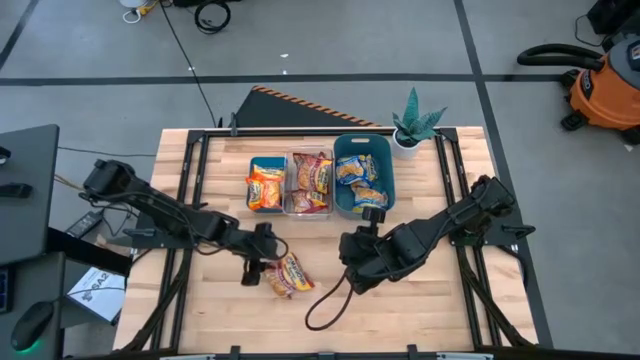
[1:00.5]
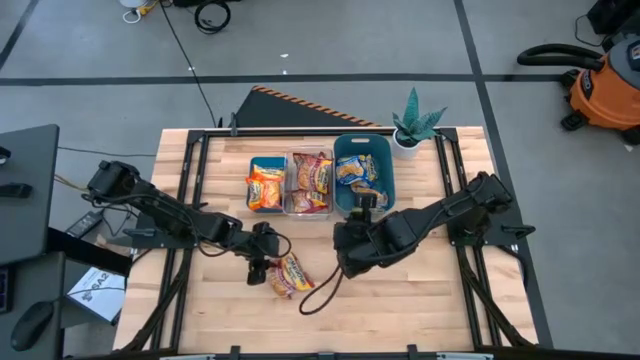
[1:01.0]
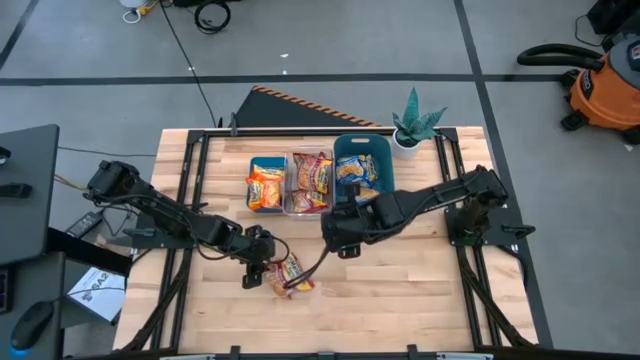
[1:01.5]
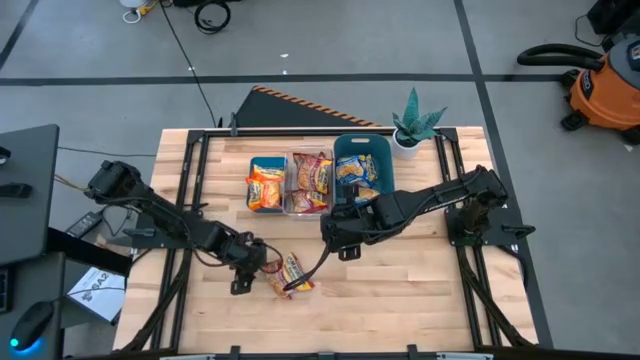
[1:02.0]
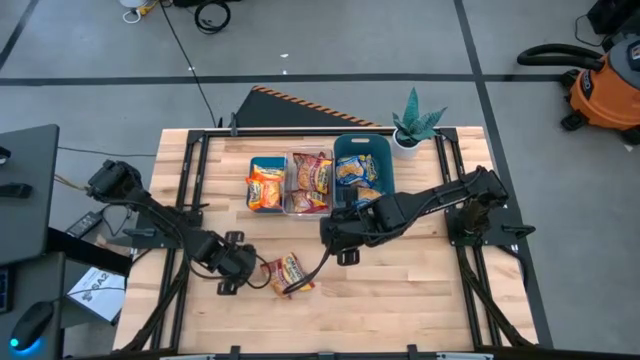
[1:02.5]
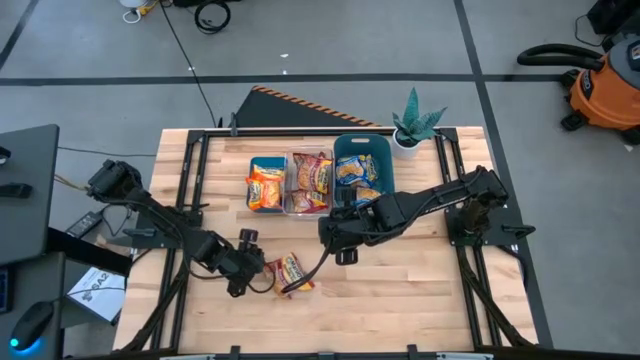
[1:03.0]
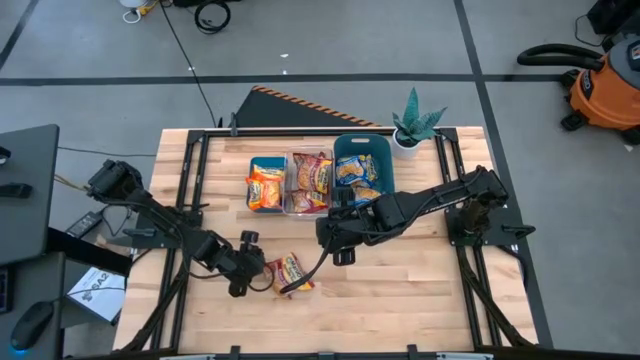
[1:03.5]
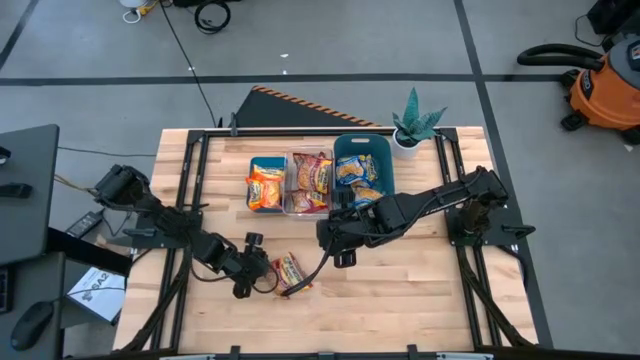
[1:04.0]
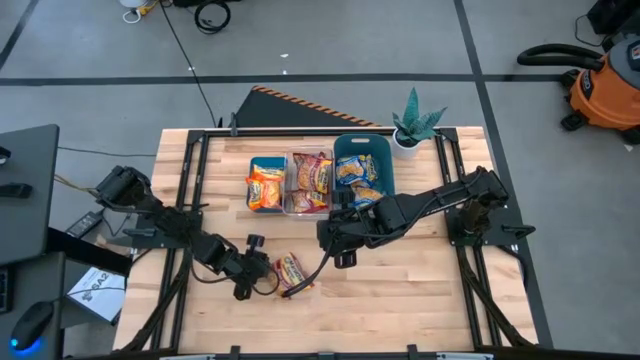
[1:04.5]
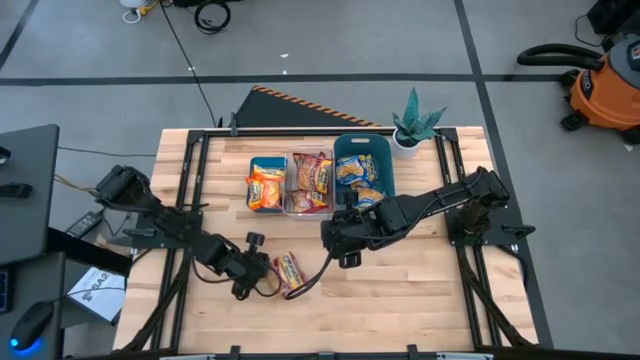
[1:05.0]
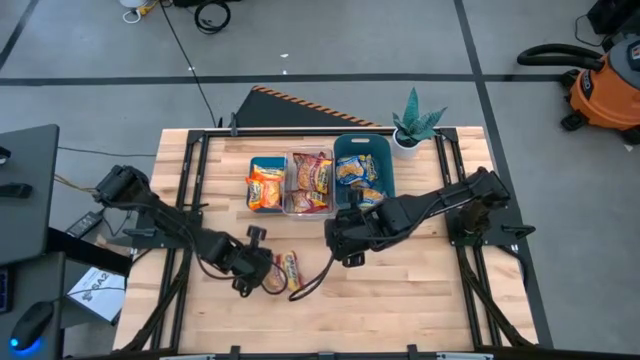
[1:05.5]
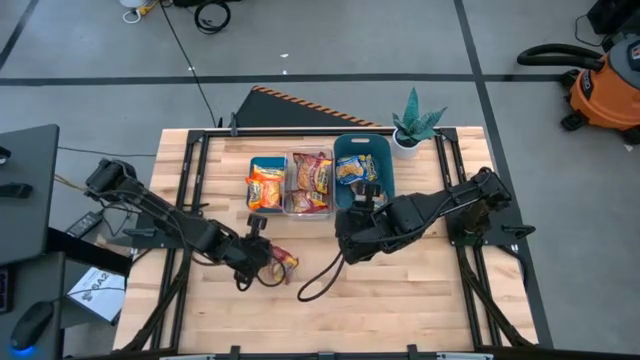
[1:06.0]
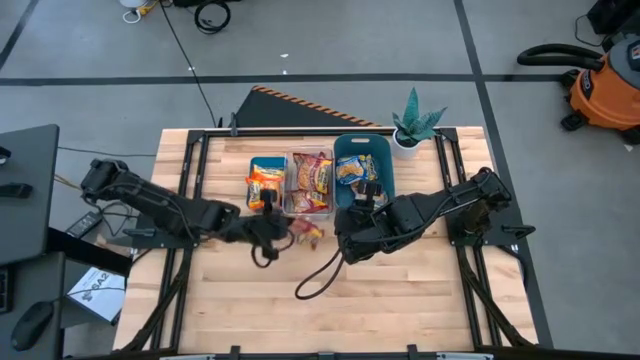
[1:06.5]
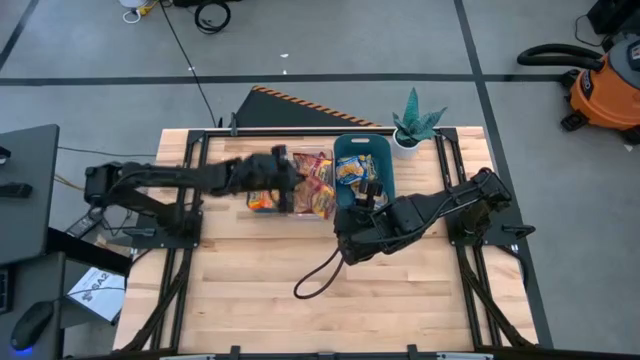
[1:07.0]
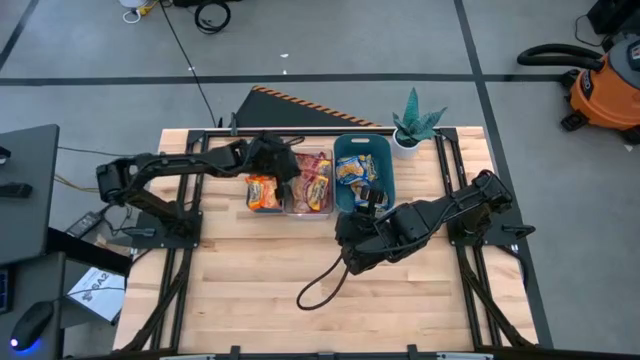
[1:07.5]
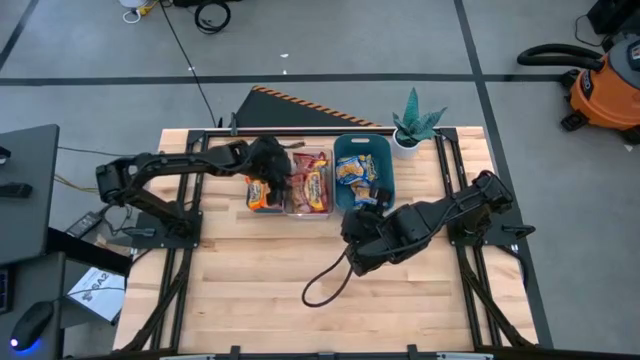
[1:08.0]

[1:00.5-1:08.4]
Task: Sort Maruchan noodles
Put the red noodle pack into the transparent bin

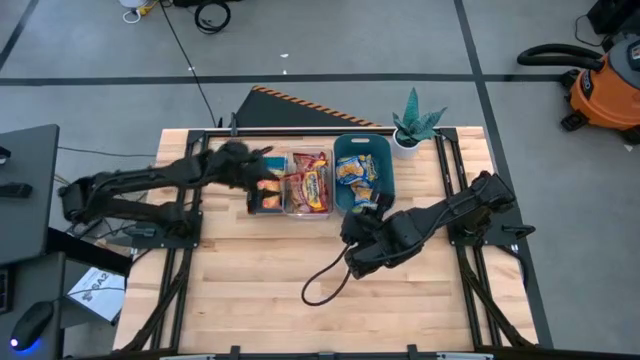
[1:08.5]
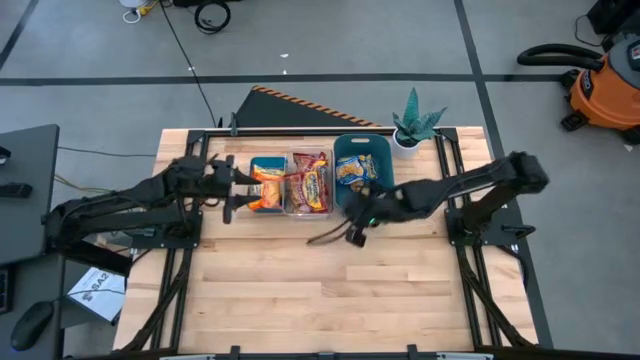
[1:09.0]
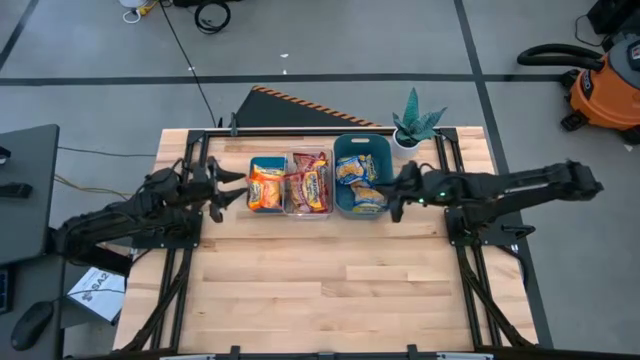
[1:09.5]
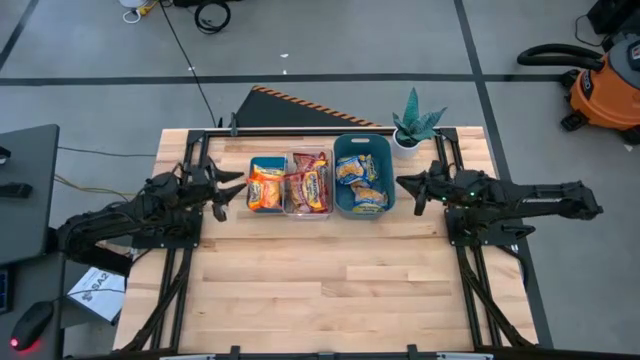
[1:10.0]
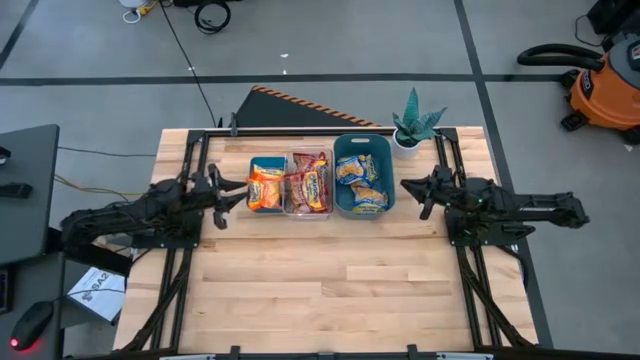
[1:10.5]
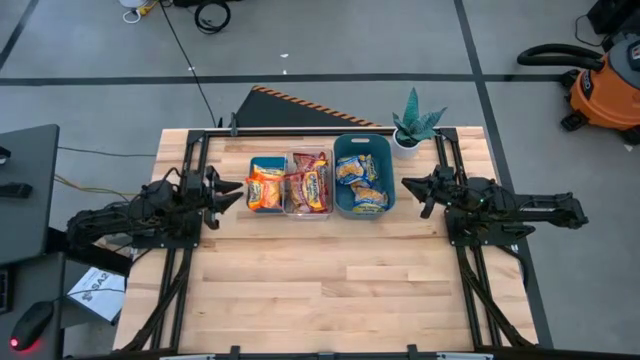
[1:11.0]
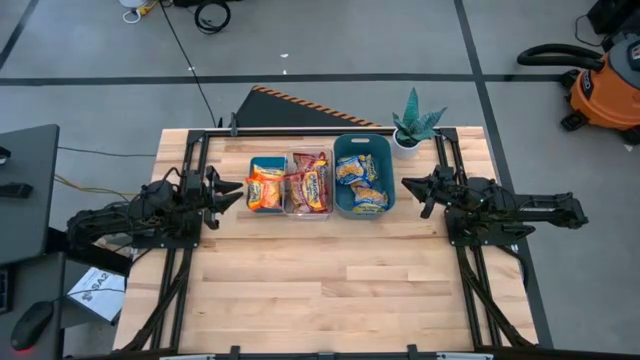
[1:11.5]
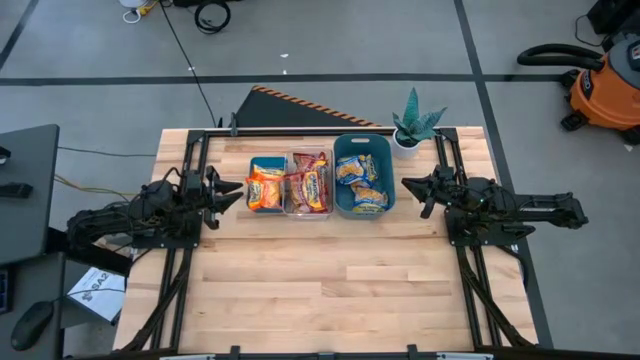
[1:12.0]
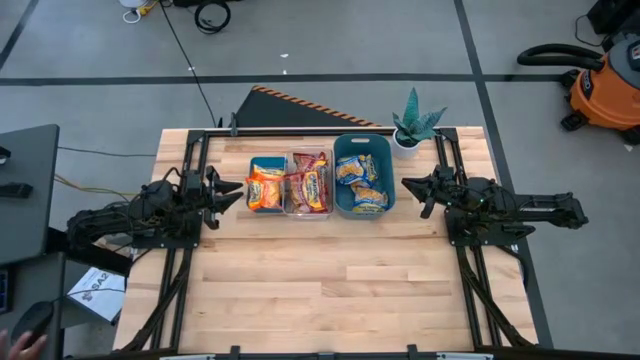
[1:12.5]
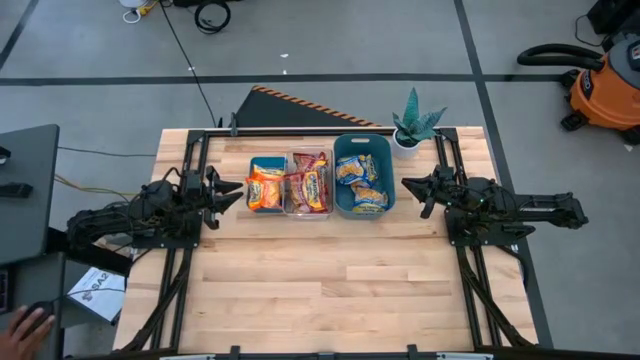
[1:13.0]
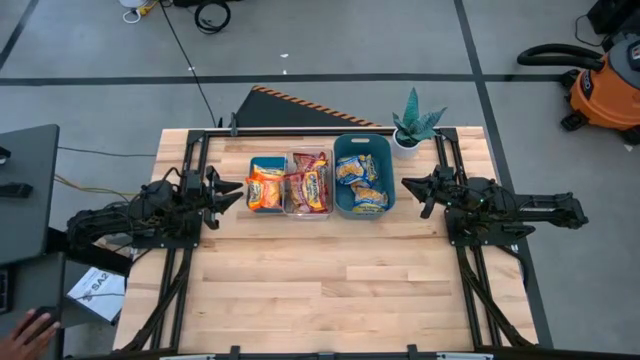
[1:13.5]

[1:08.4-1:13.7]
Return to Home Position

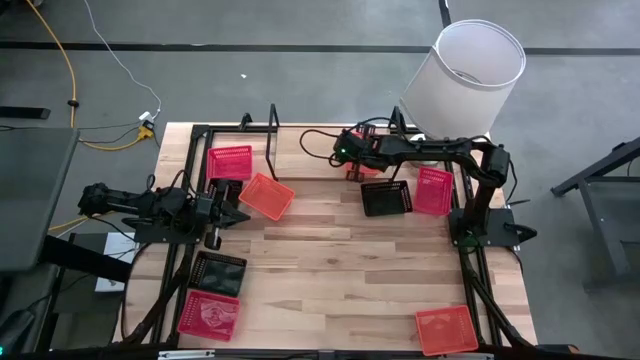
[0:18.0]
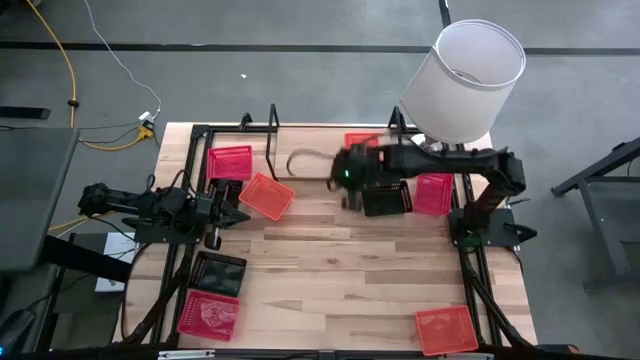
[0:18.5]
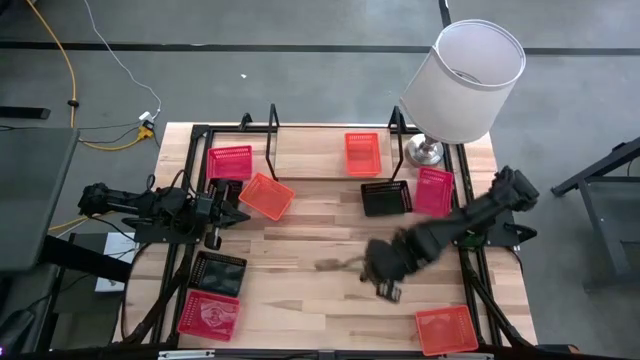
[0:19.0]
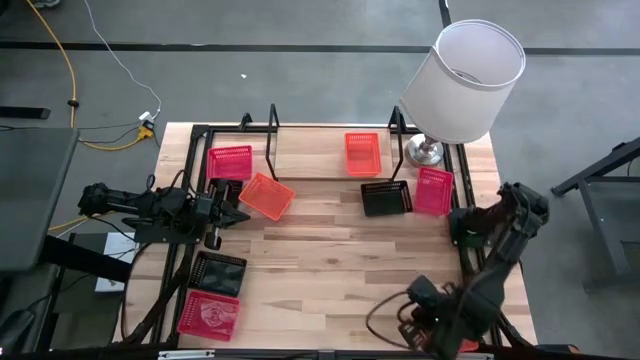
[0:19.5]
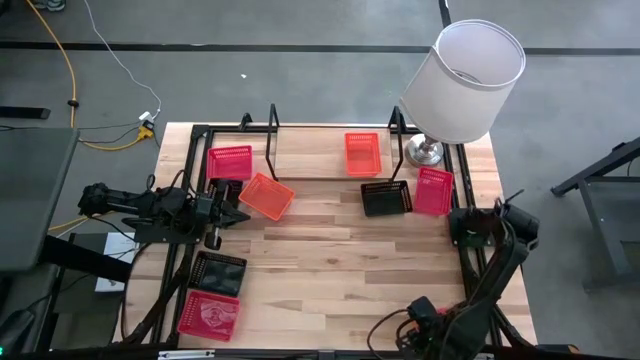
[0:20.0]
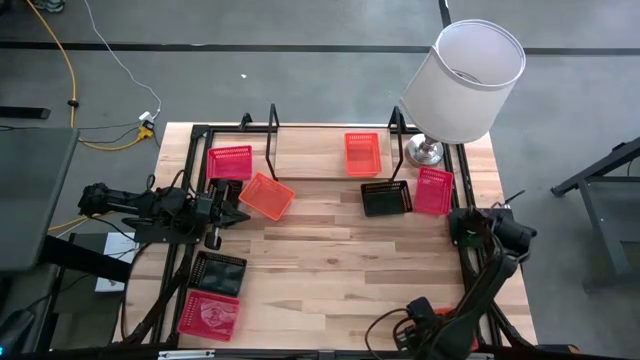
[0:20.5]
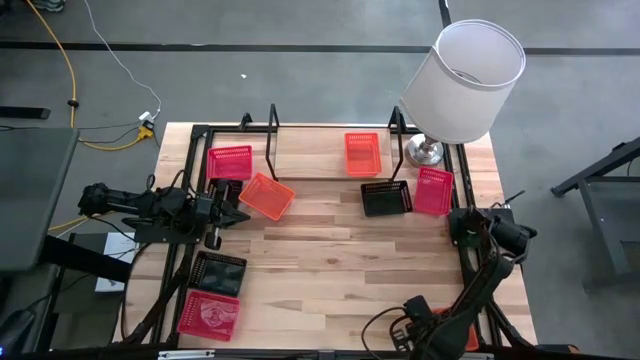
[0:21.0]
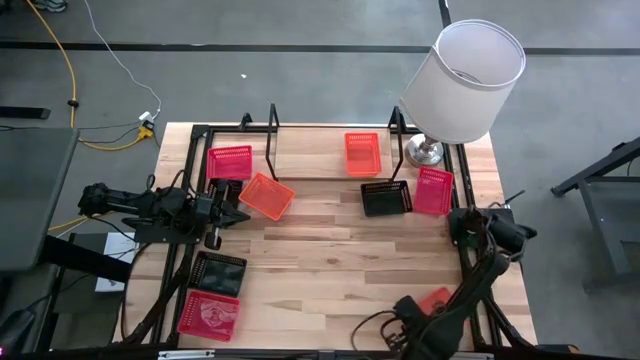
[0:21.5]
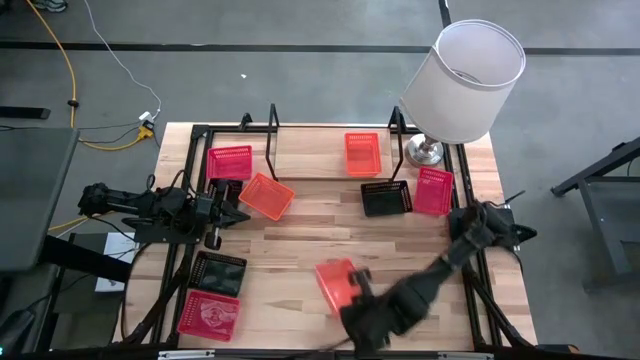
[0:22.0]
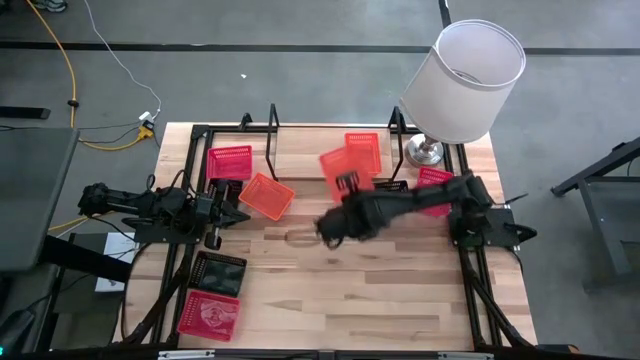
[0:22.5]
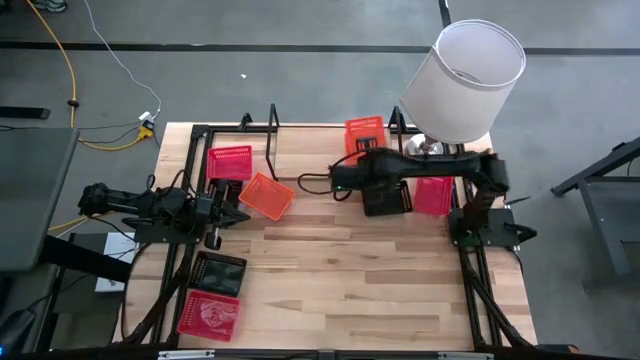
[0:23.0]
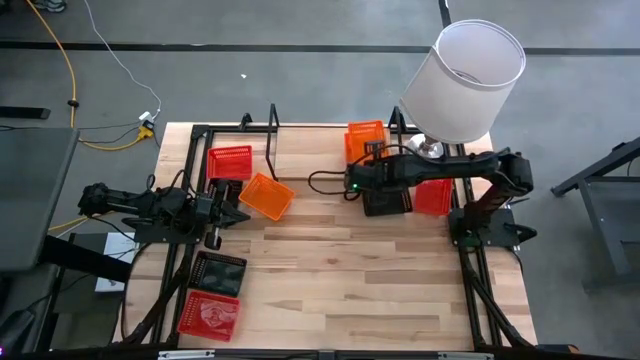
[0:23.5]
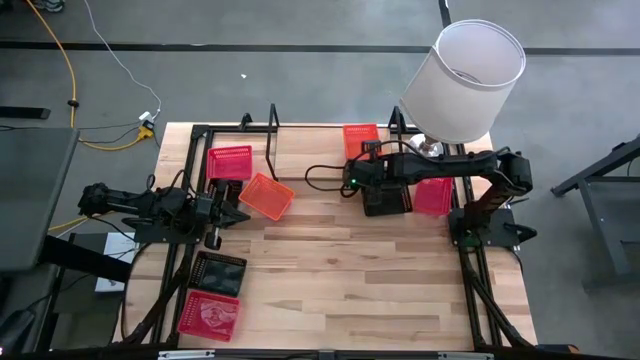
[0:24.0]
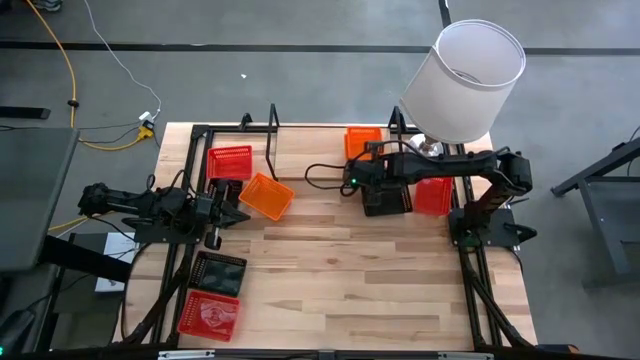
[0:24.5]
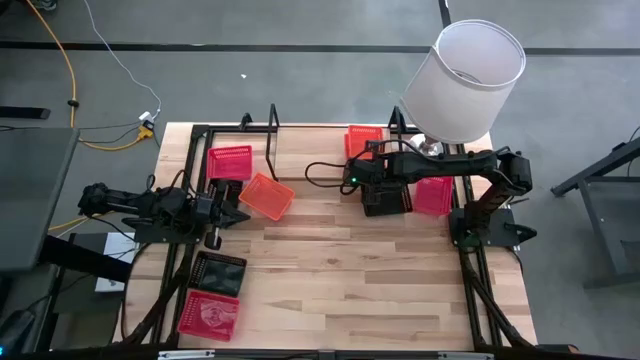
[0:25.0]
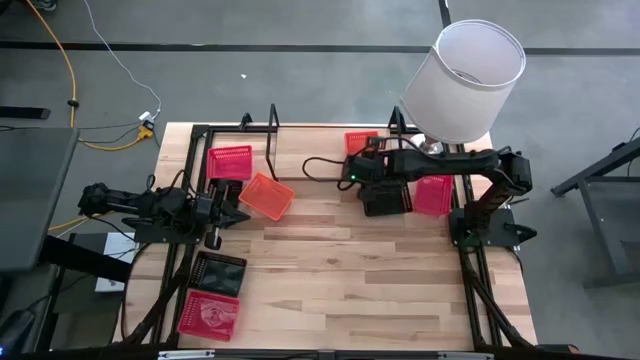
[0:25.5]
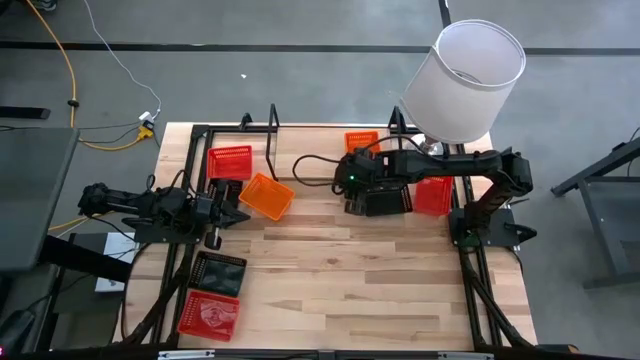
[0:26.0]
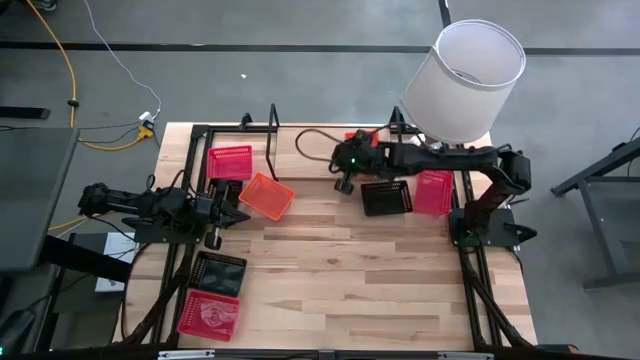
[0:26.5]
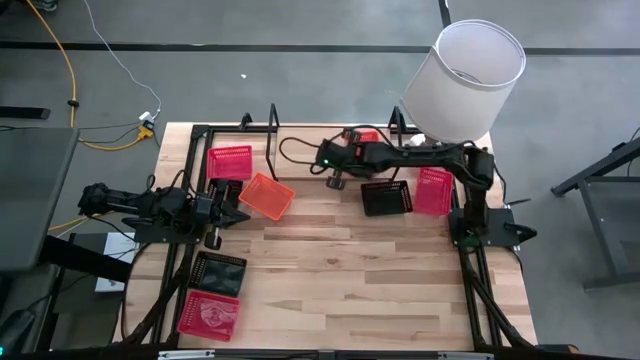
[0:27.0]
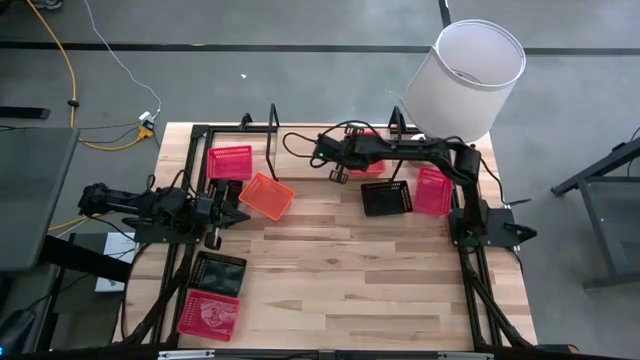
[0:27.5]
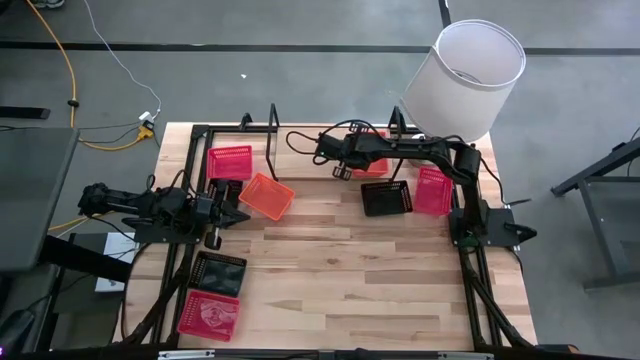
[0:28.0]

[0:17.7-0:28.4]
Task: Stack baskets on shelf by color
Stack the bottom orange basket on top of the orange basket on the shelf
